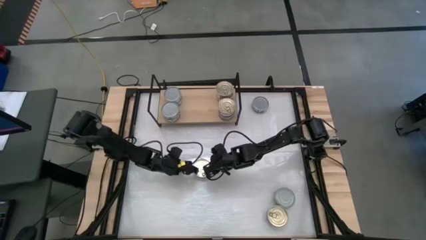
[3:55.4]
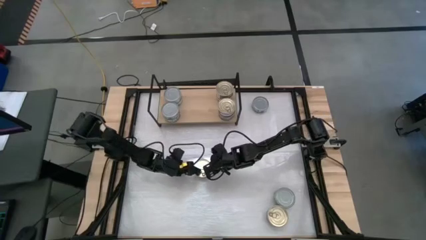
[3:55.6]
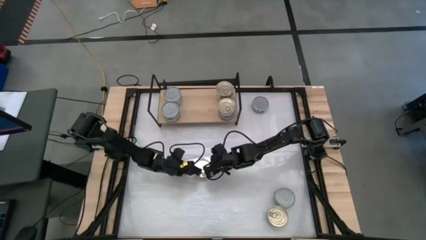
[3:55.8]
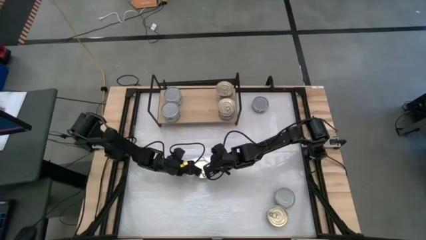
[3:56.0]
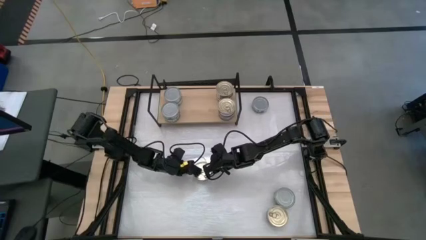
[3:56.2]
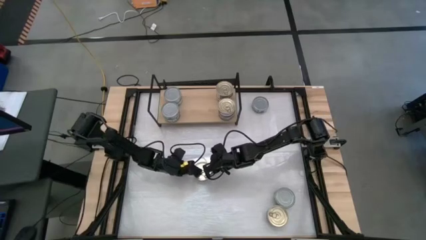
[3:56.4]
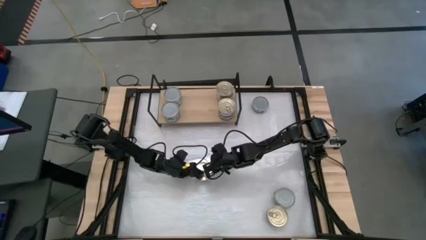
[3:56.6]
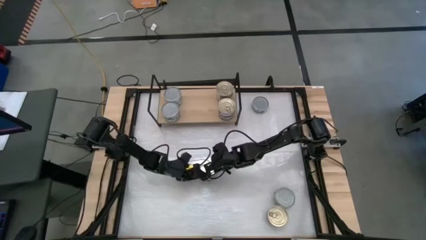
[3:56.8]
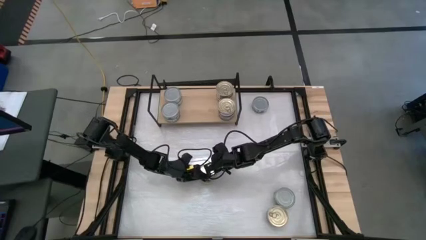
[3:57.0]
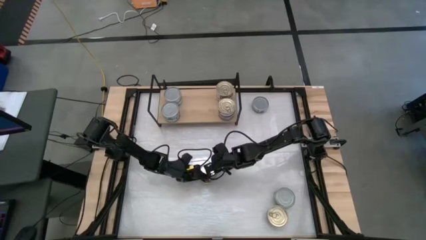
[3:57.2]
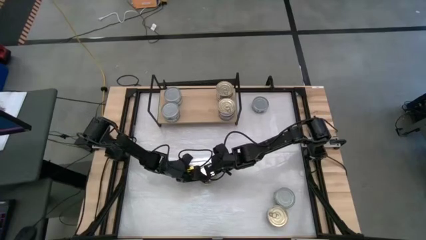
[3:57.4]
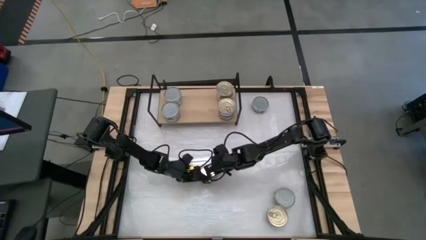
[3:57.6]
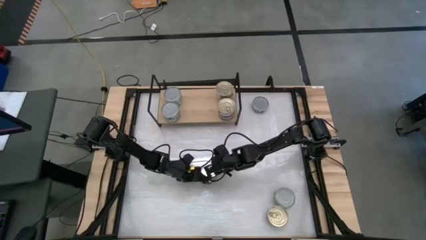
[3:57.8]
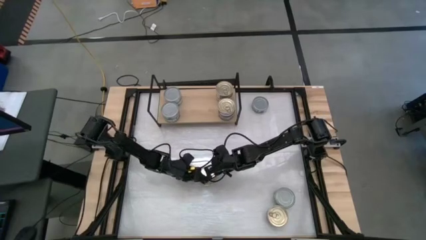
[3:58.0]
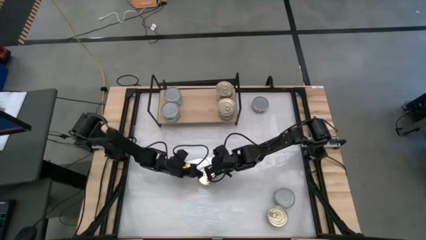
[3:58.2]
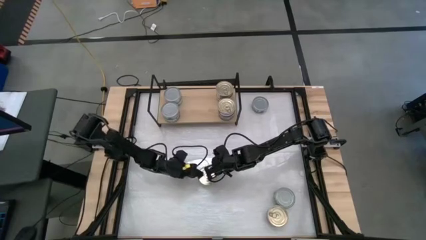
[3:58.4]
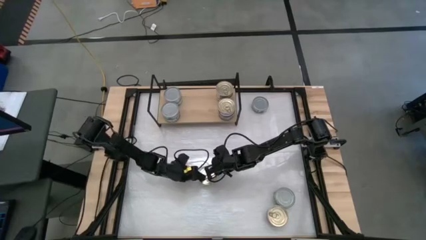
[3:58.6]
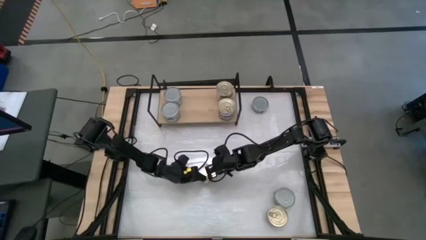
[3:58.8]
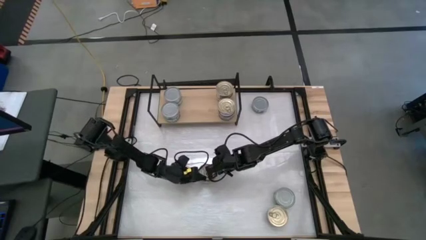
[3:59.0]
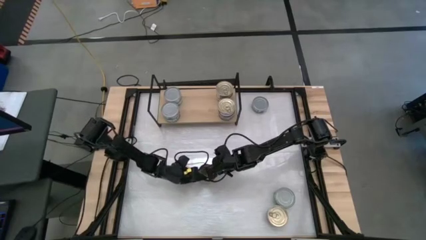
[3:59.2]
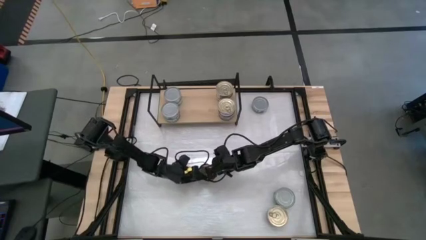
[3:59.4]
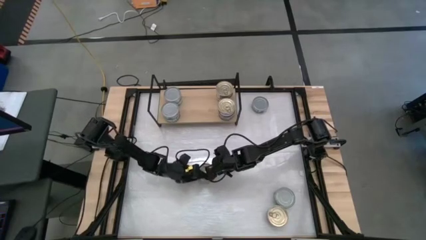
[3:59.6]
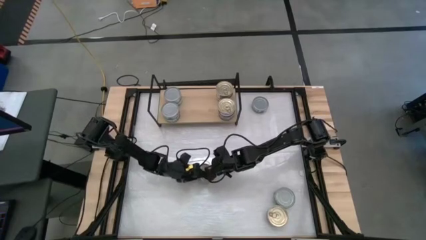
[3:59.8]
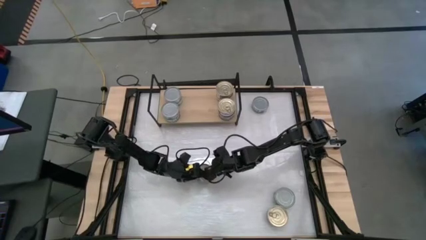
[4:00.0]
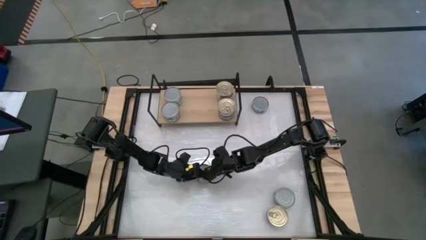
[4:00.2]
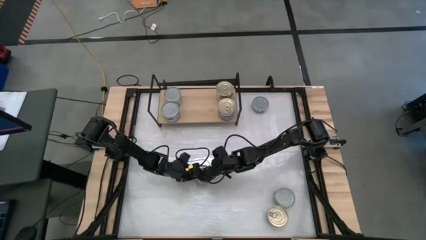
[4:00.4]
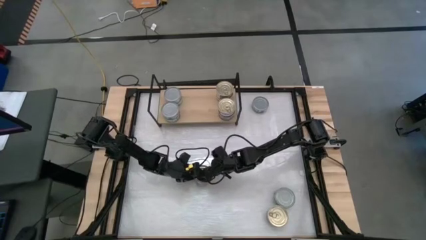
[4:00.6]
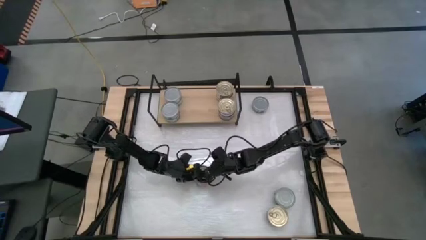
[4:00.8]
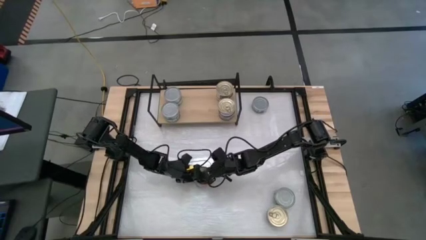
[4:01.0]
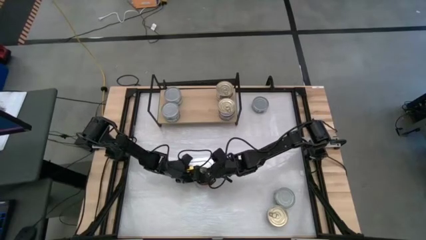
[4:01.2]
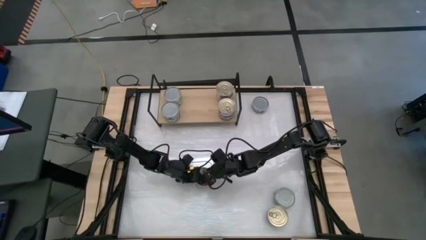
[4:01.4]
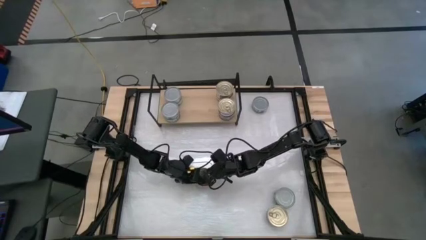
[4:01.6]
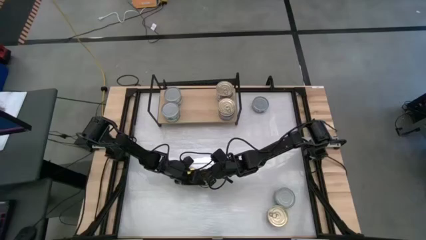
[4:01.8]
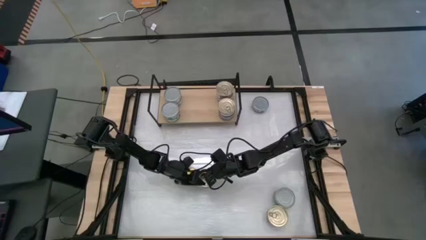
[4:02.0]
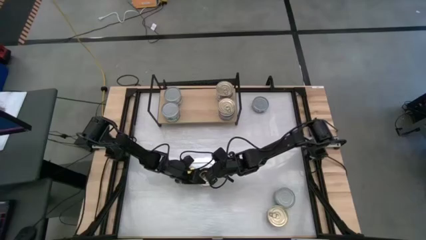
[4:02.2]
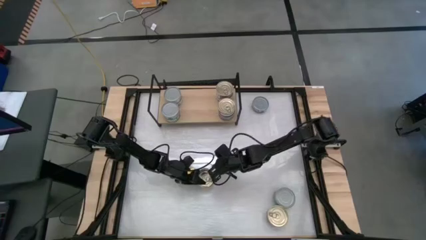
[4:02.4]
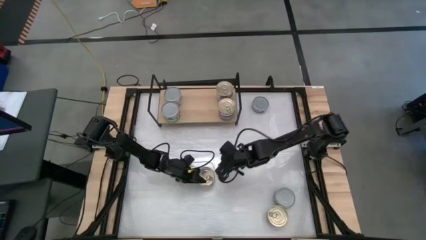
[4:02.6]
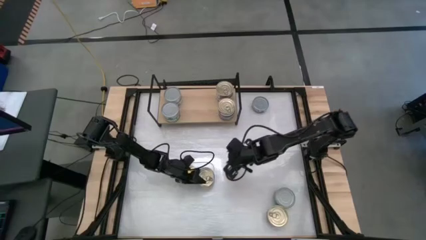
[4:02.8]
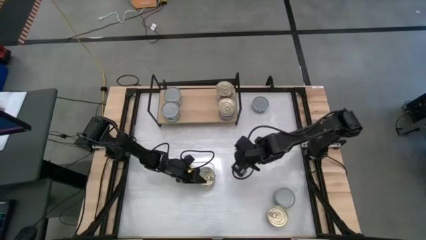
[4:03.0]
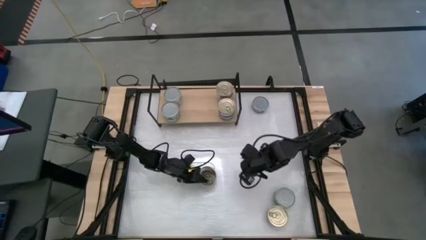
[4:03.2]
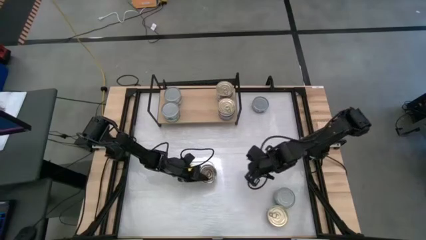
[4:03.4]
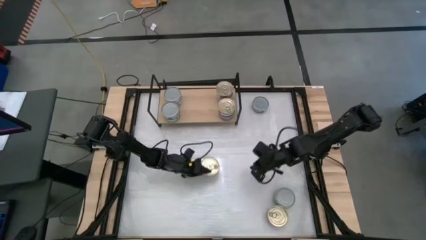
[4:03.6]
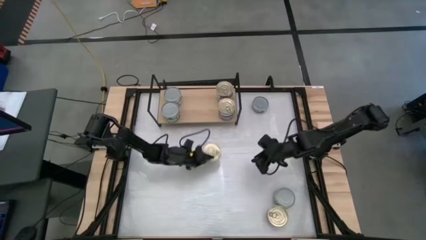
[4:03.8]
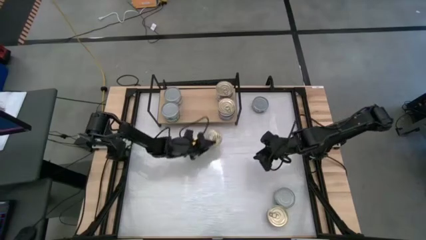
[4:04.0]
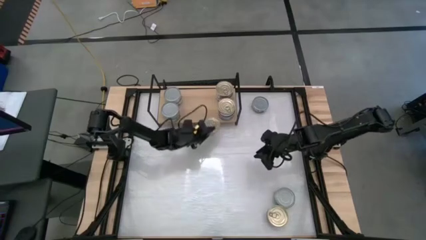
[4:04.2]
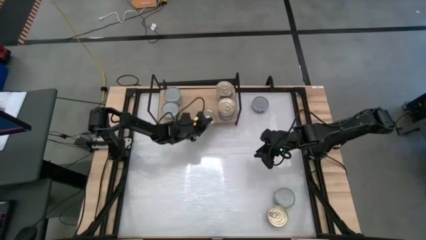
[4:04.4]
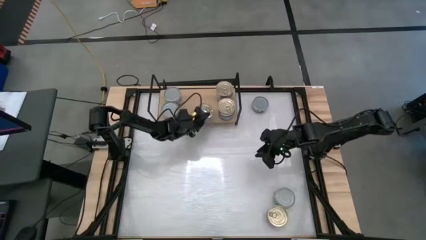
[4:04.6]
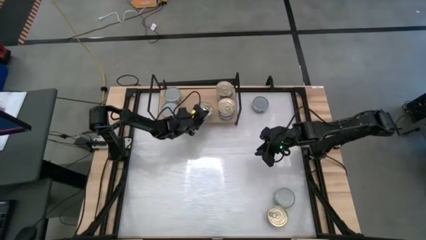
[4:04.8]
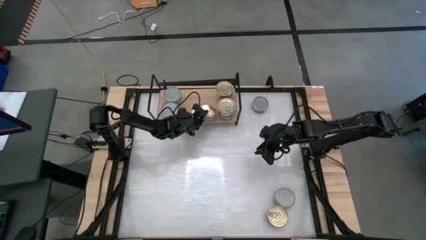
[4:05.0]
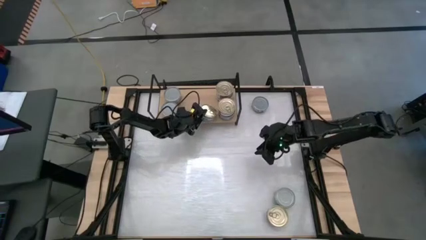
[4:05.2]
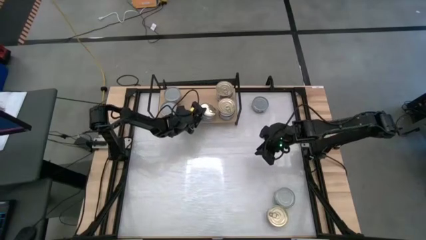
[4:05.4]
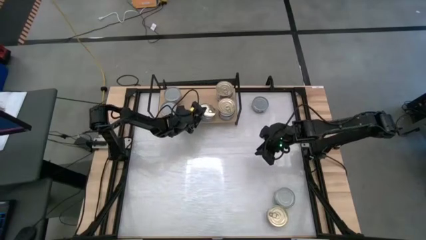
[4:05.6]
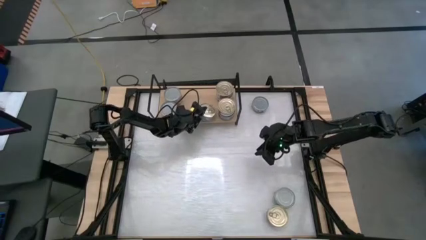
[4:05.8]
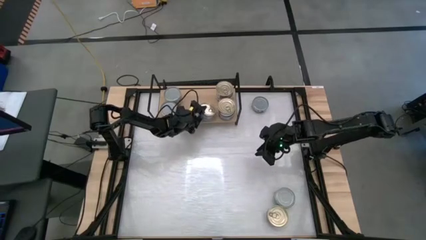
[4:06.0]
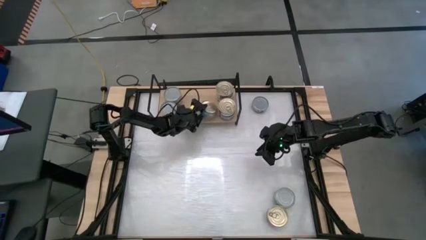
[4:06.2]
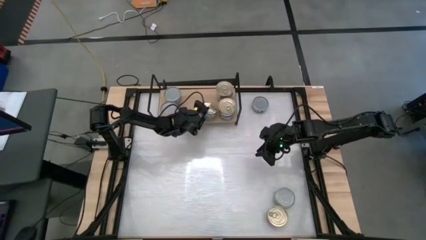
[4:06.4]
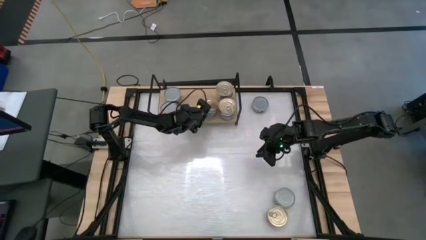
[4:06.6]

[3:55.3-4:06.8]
Task: Stack canned seafood by type on shelf
Put the blue tuna can on the shelf

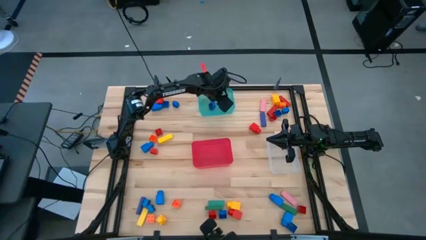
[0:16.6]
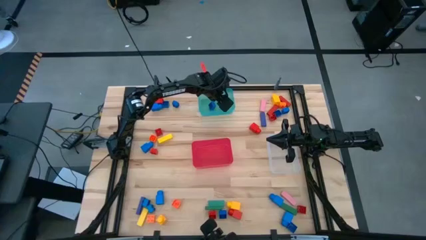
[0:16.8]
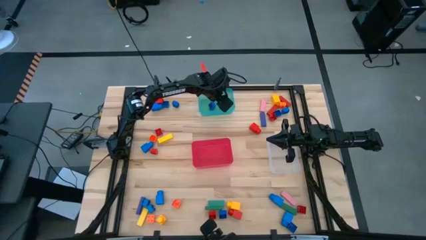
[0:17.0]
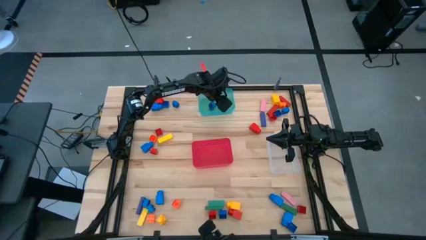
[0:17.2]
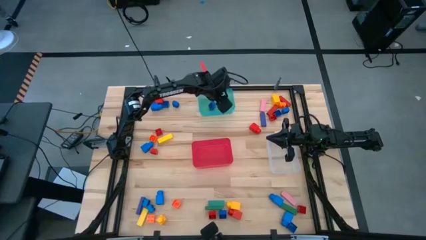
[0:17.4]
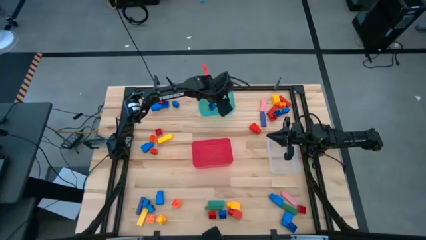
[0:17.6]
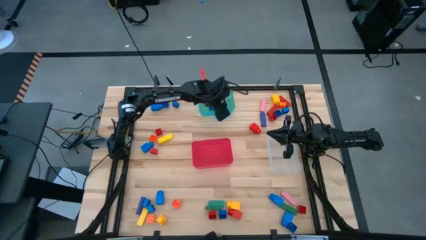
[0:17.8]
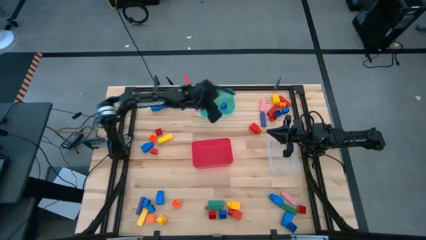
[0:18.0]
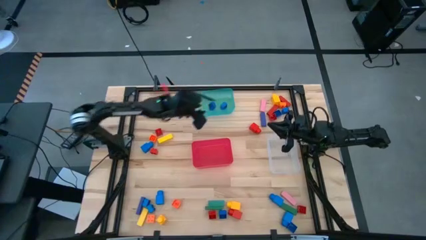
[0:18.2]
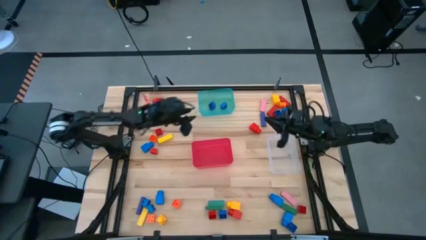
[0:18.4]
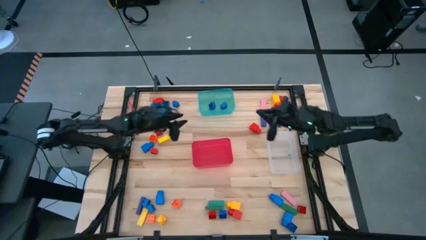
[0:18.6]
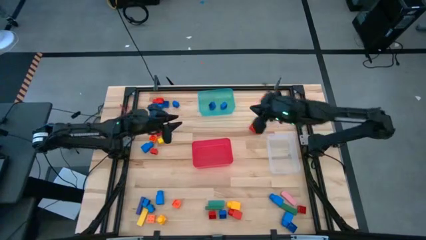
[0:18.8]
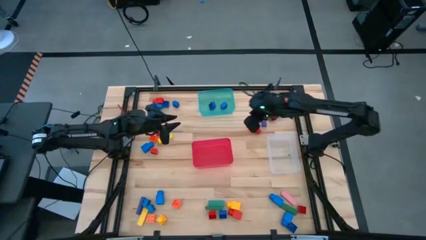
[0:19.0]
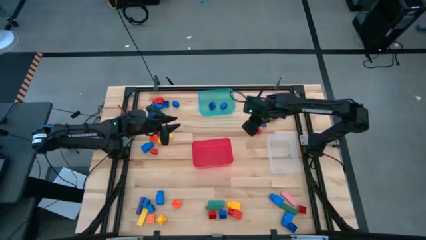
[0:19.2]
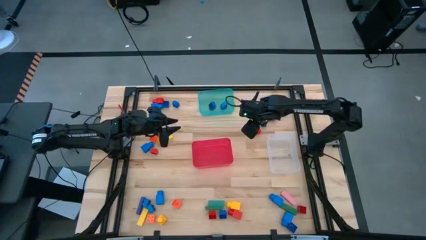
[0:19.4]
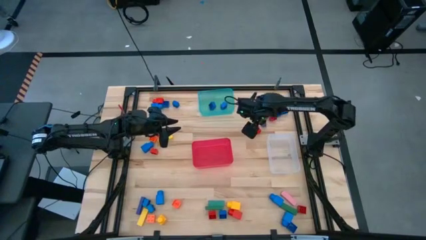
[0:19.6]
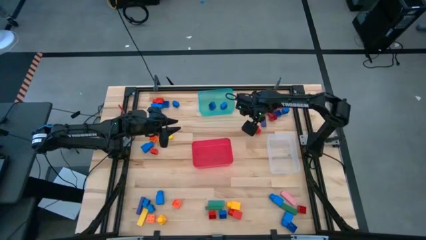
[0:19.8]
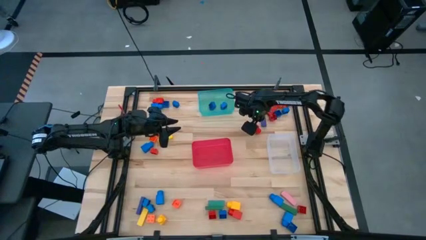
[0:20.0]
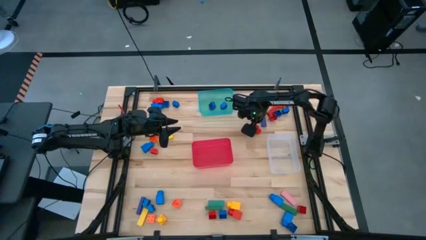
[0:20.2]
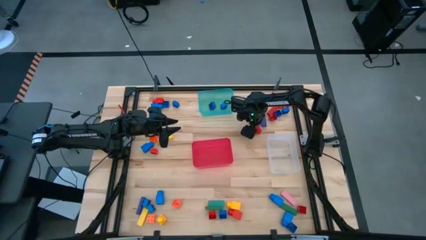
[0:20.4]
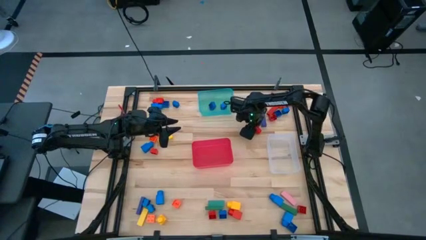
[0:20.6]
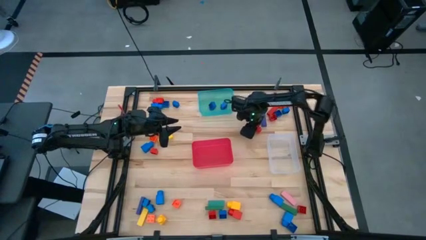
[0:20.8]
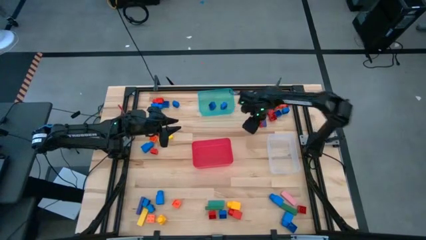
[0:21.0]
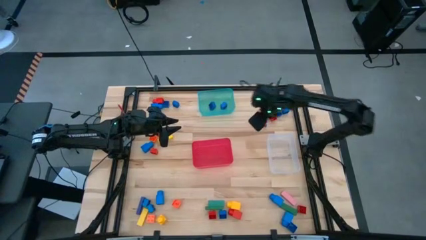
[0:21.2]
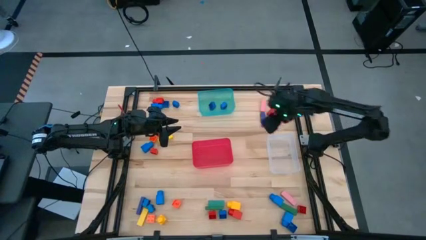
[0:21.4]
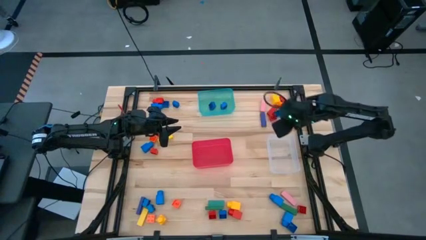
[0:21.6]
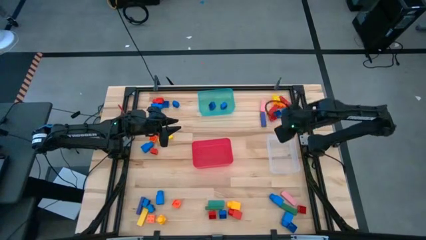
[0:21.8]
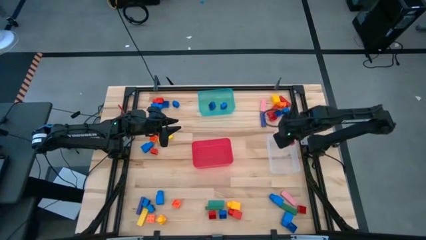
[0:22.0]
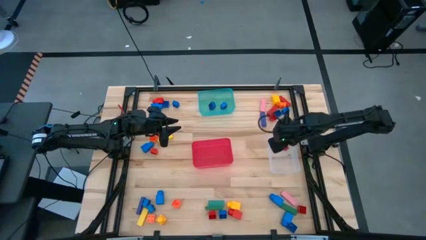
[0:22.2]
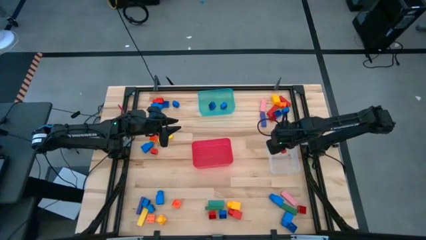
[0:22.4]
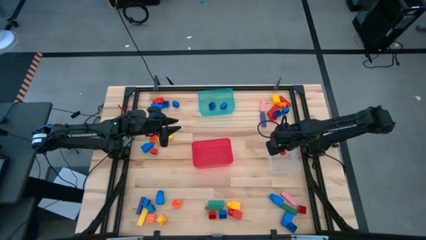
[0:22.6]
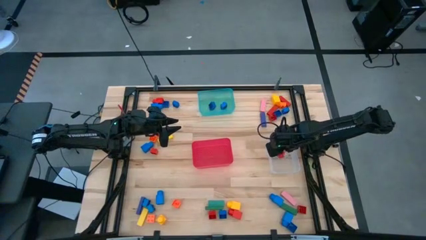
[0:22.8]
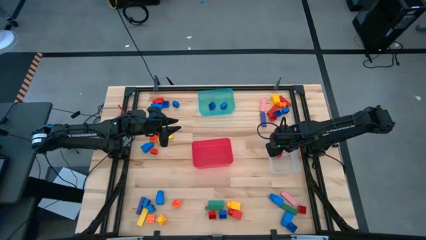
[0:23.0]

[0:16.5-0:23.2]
Task: Sort blocks by size
Put the red 1 stud game piece into the transparent bin
